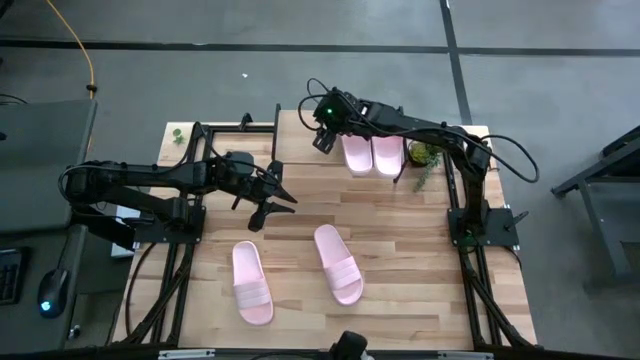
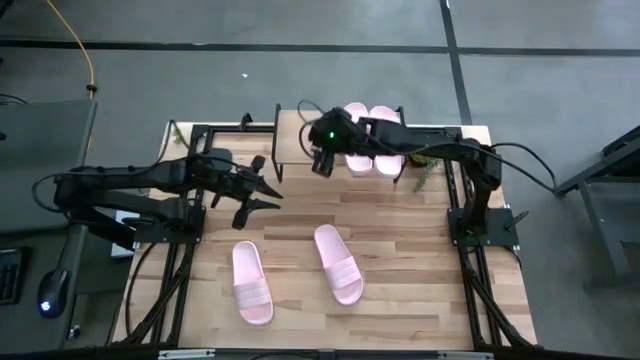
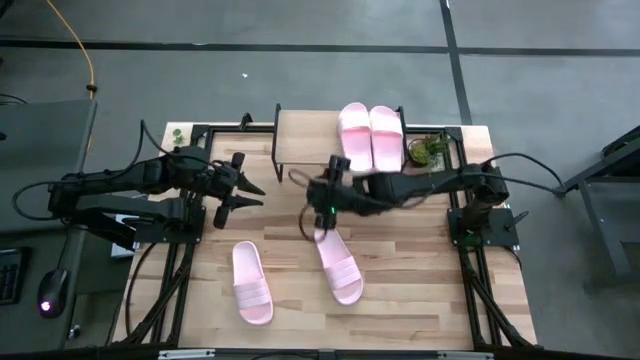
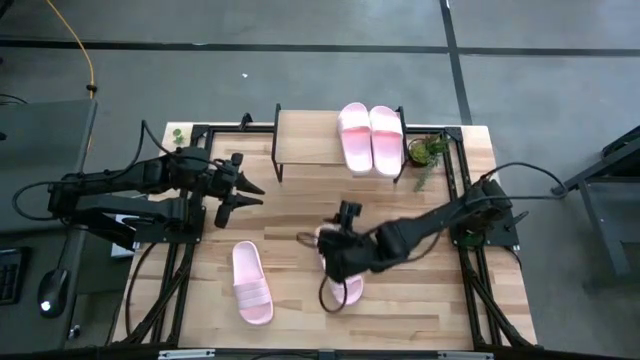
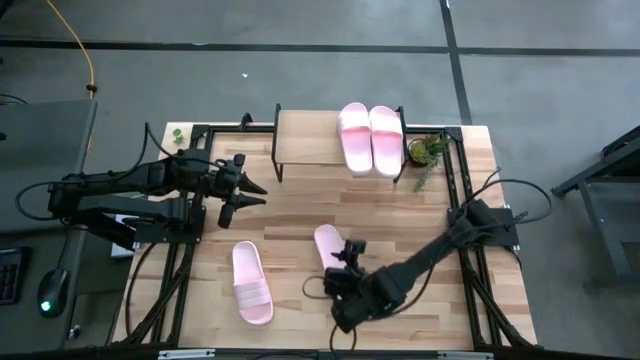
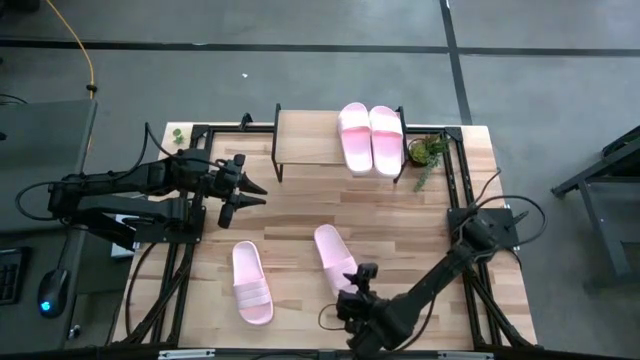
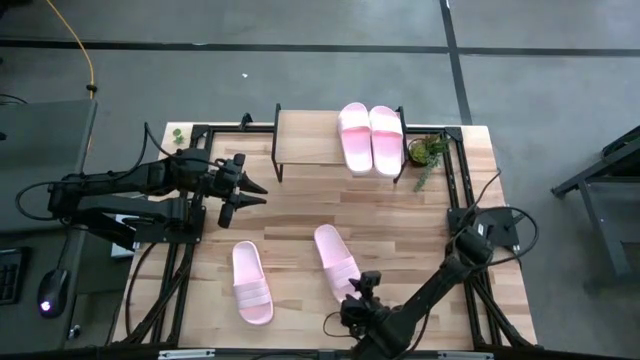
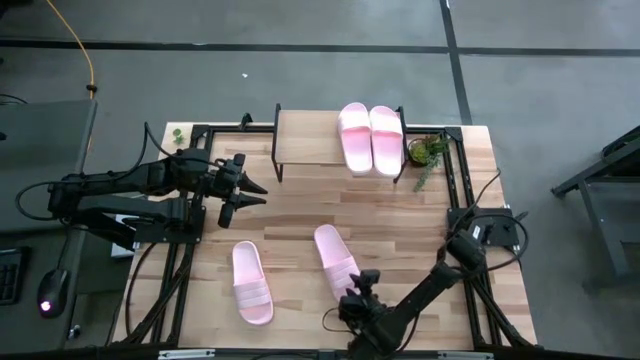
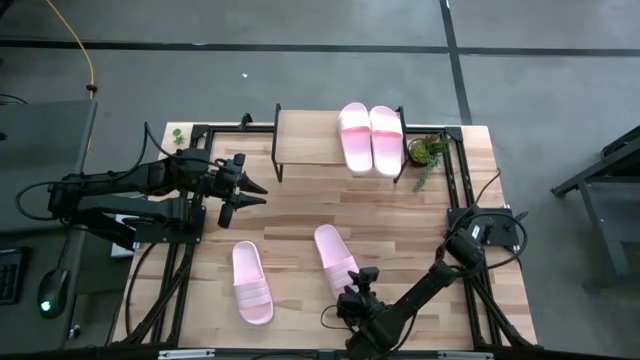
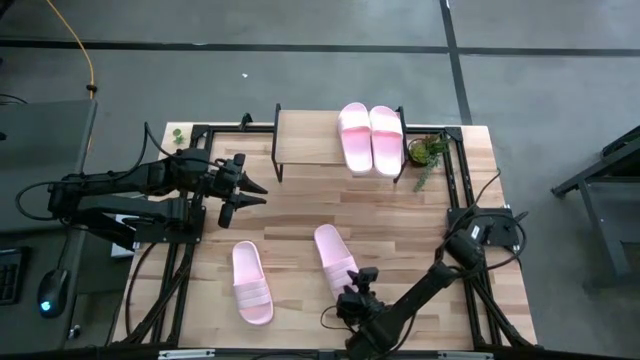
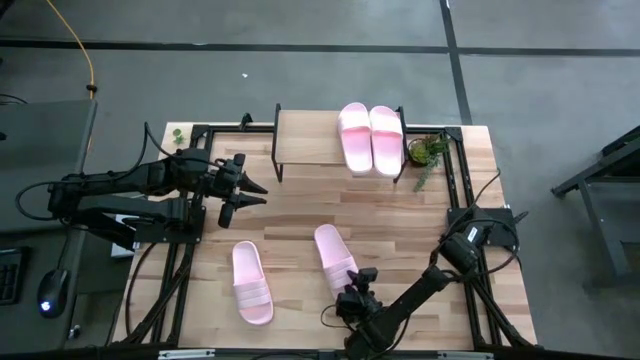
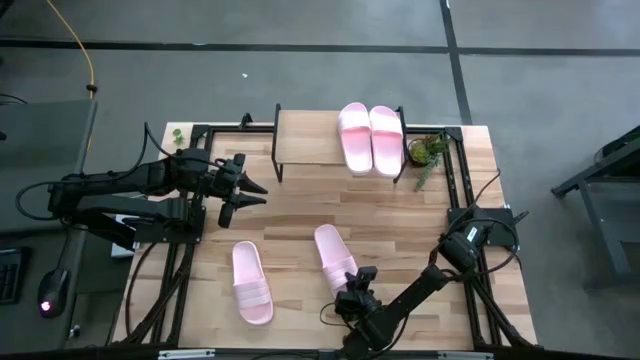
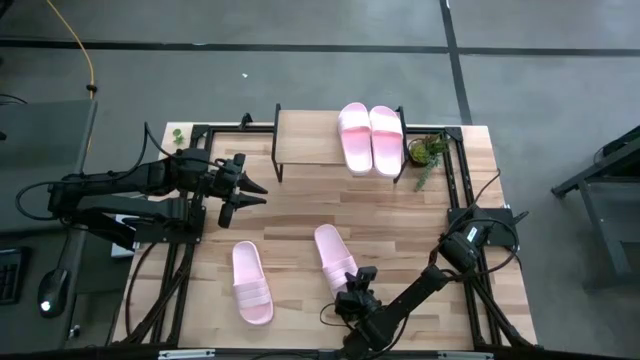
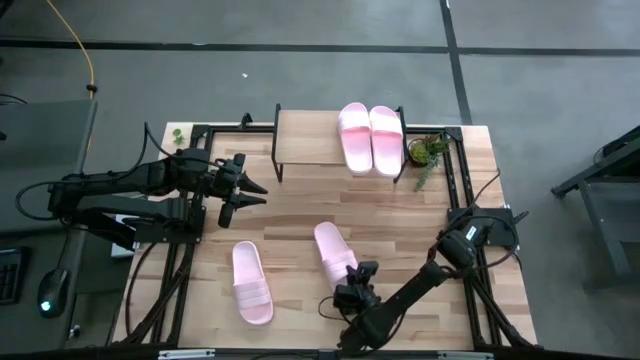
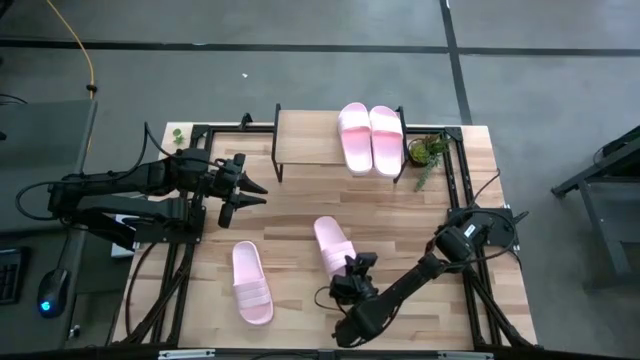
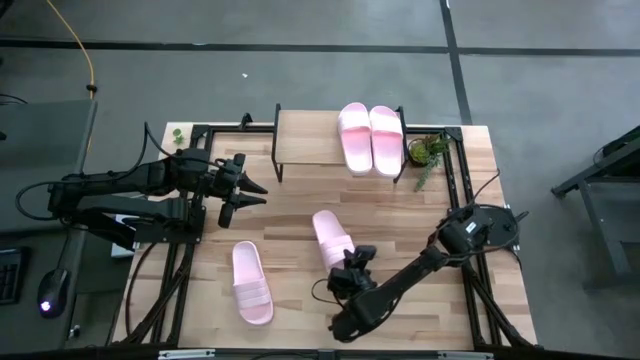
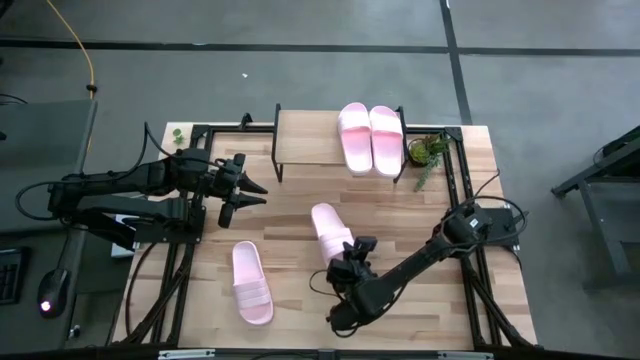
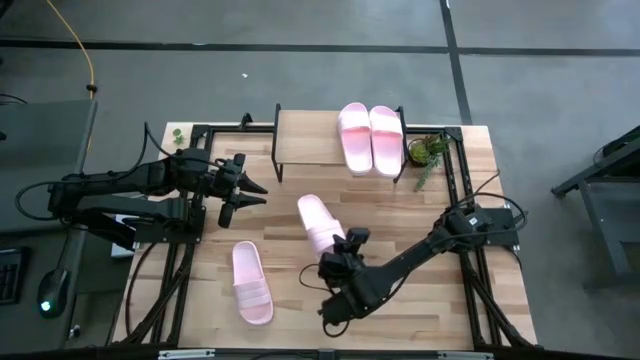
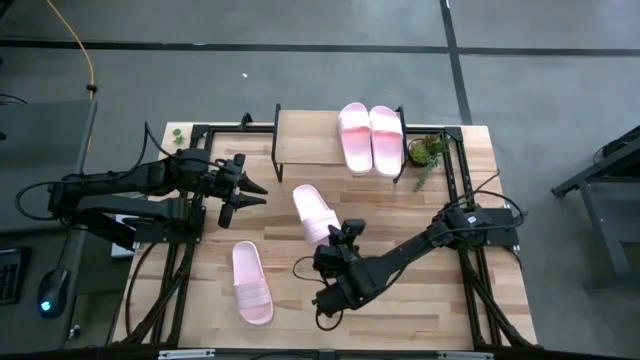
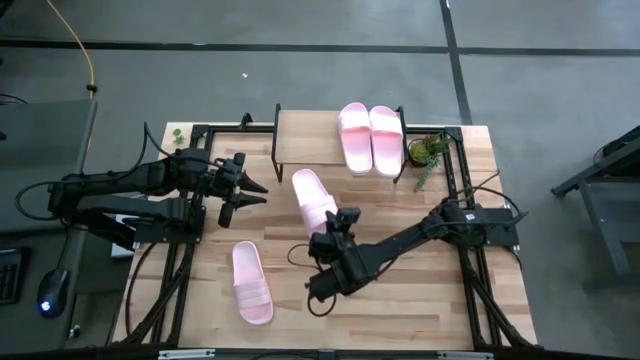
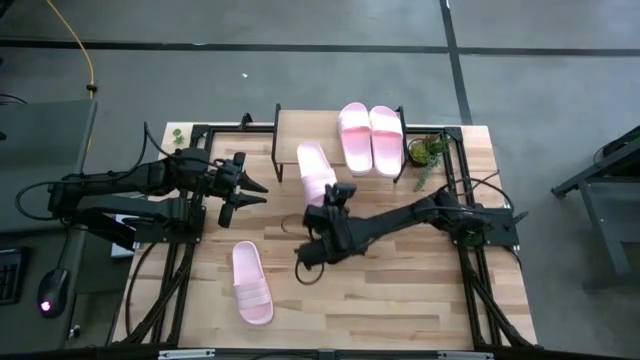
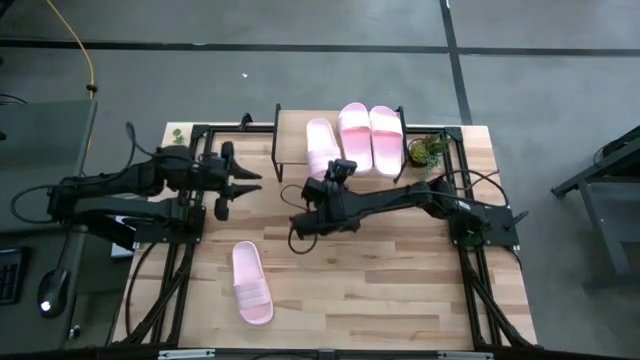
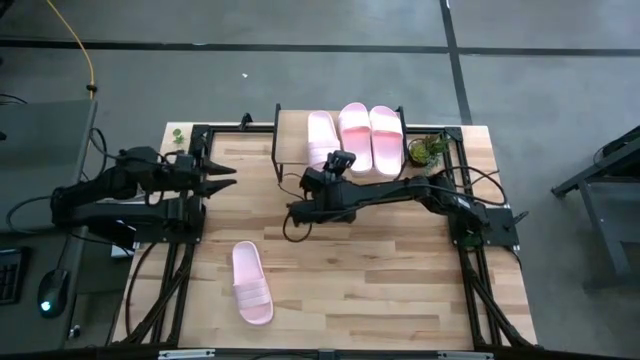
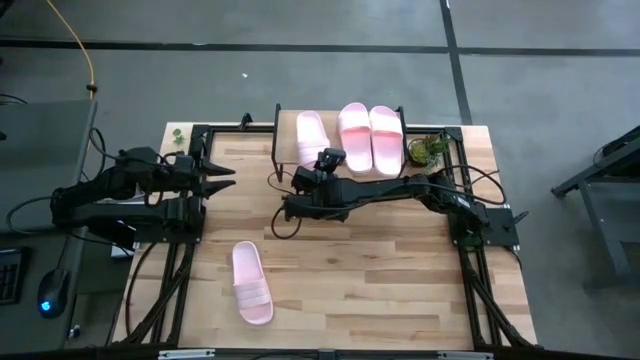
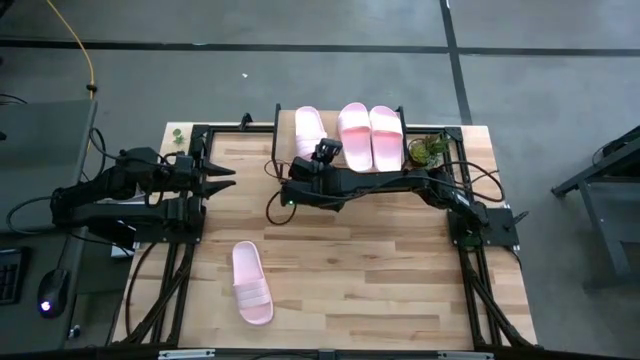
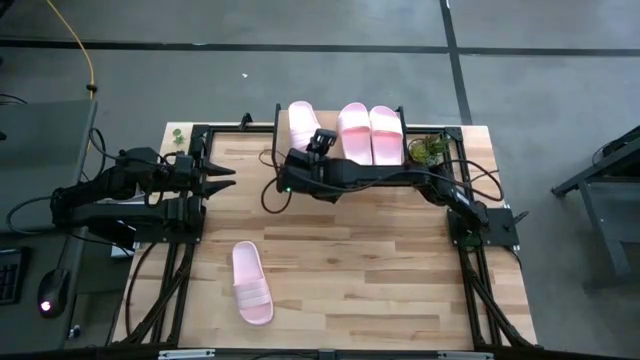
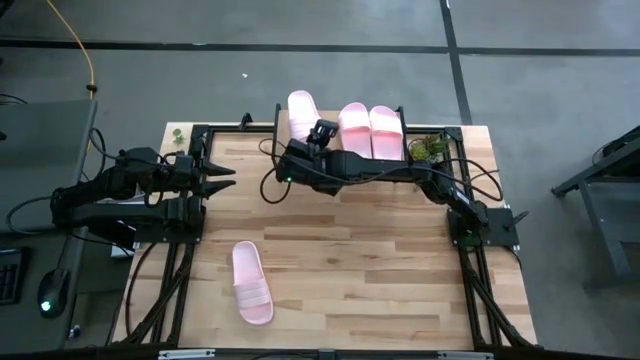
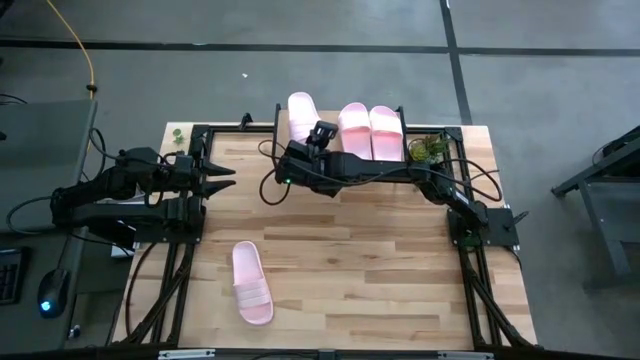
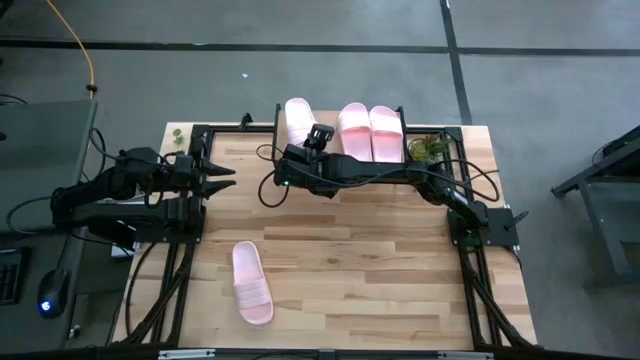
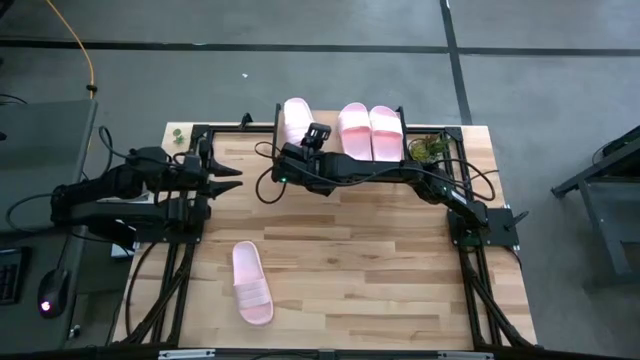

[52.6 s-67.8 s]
Task: Pick and place slides into the shelf
Put the pink slide on the shelf
